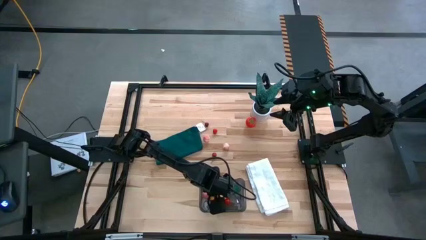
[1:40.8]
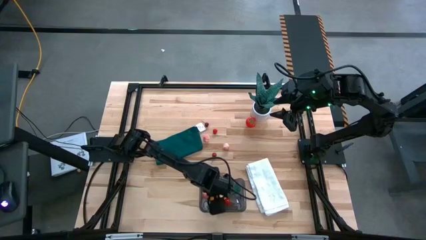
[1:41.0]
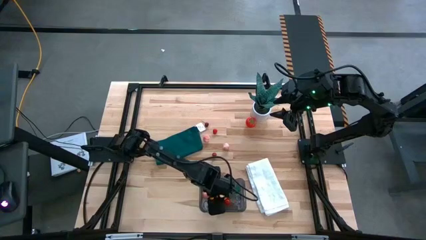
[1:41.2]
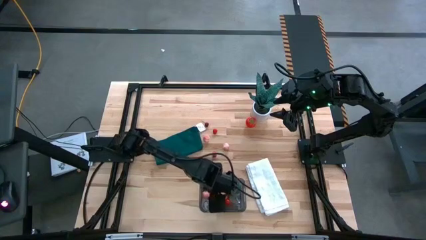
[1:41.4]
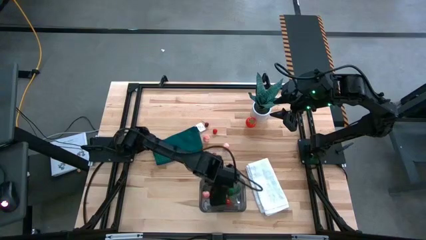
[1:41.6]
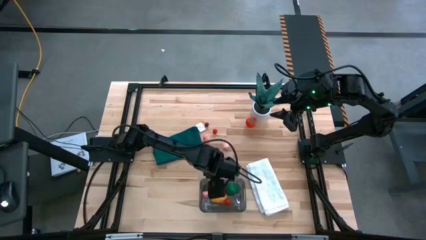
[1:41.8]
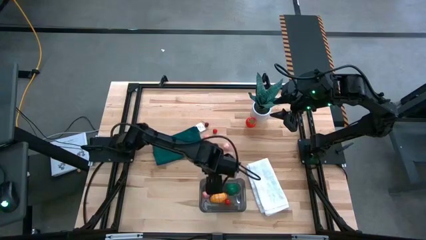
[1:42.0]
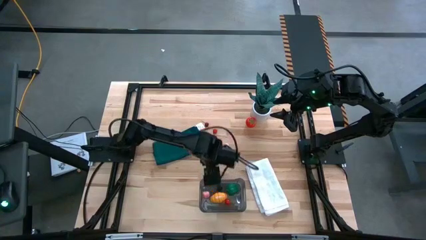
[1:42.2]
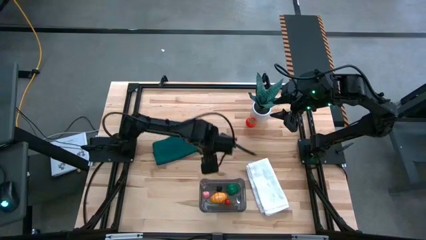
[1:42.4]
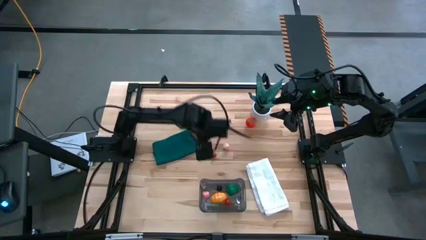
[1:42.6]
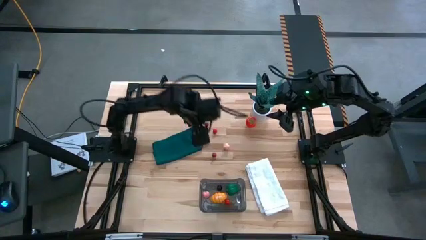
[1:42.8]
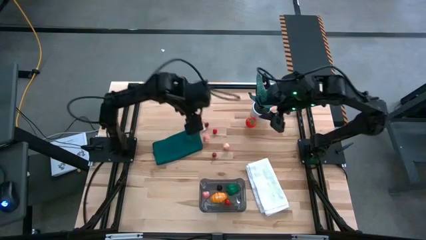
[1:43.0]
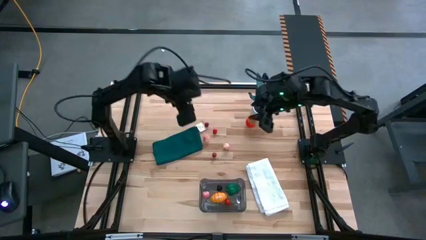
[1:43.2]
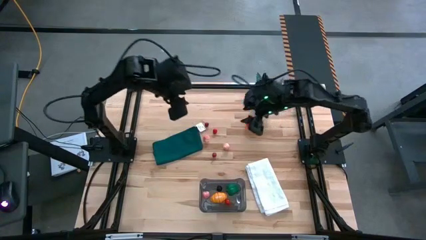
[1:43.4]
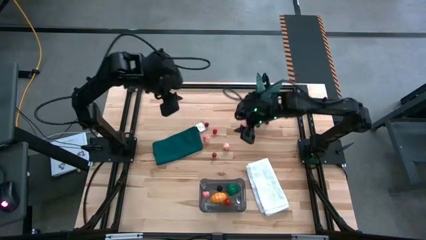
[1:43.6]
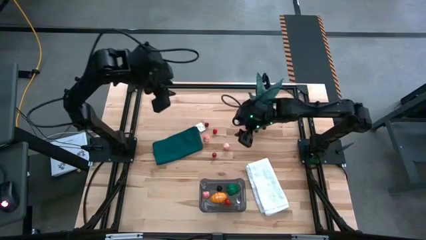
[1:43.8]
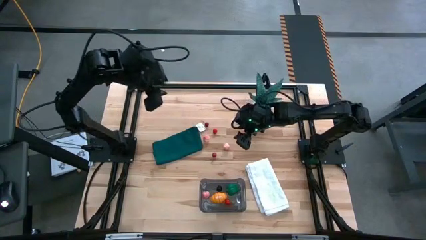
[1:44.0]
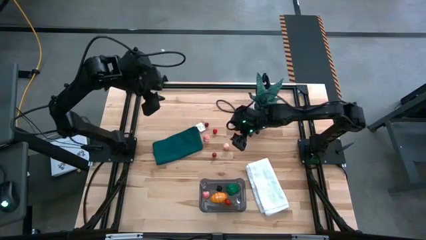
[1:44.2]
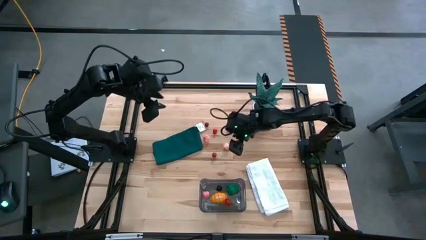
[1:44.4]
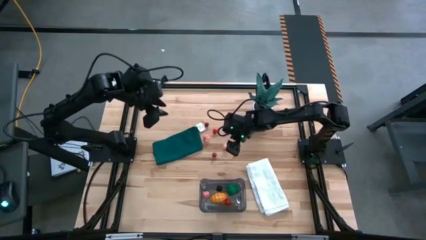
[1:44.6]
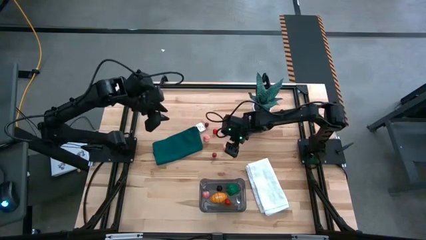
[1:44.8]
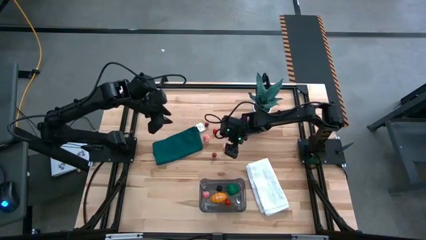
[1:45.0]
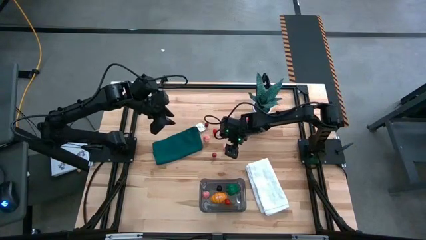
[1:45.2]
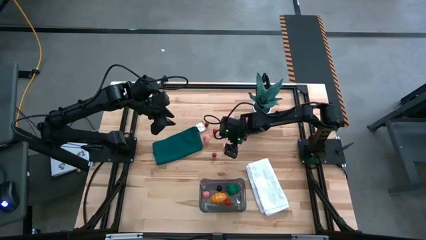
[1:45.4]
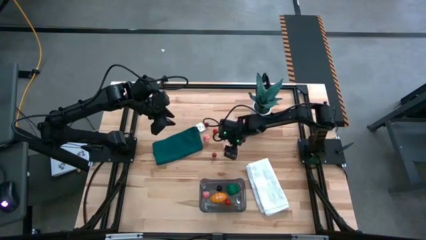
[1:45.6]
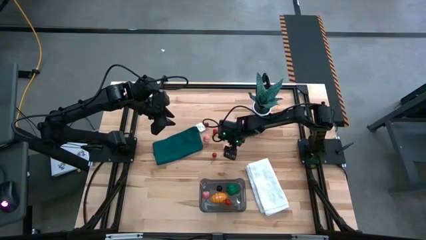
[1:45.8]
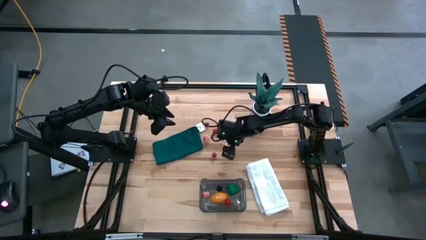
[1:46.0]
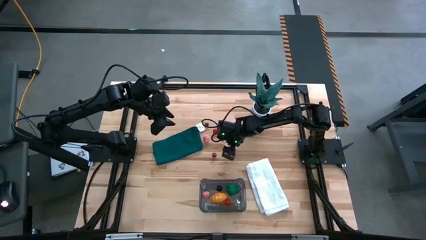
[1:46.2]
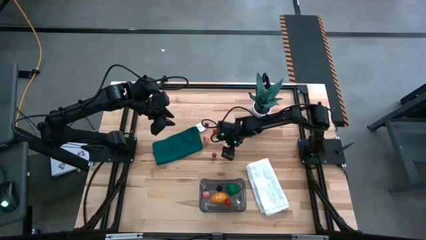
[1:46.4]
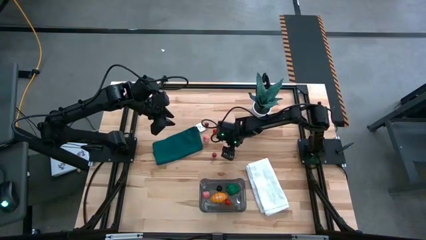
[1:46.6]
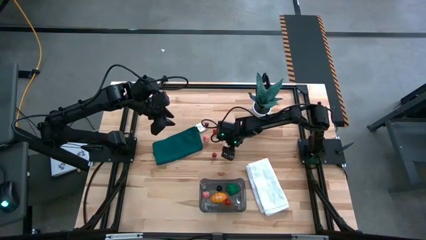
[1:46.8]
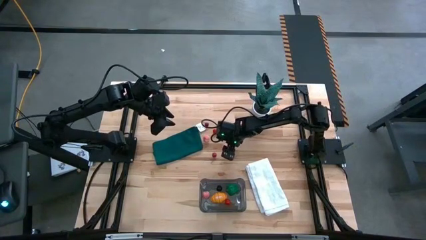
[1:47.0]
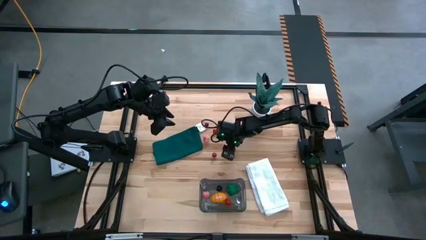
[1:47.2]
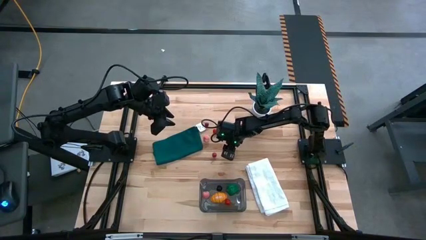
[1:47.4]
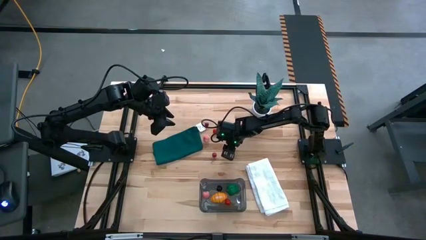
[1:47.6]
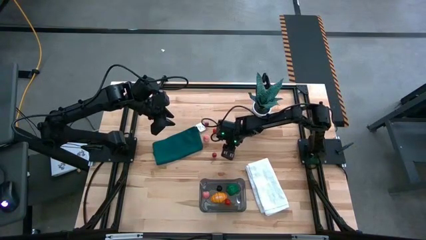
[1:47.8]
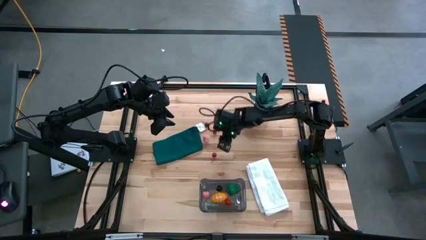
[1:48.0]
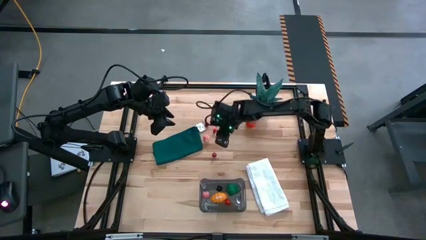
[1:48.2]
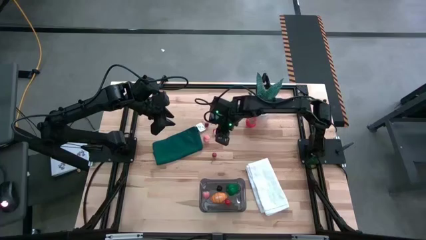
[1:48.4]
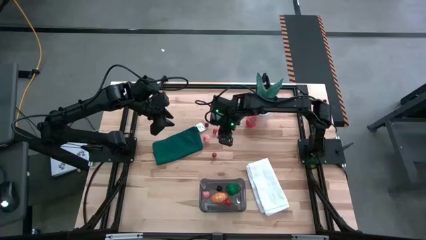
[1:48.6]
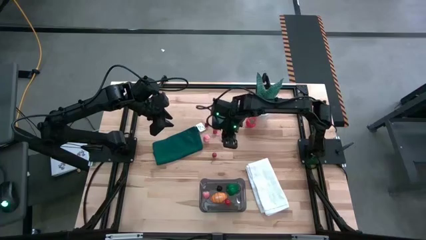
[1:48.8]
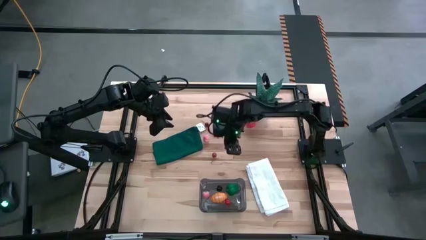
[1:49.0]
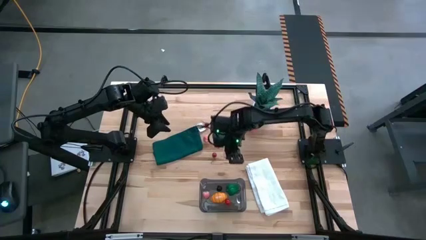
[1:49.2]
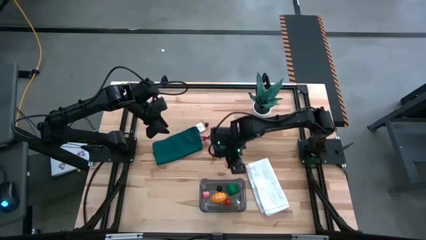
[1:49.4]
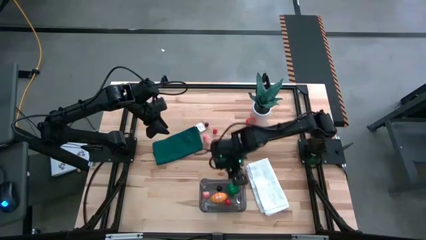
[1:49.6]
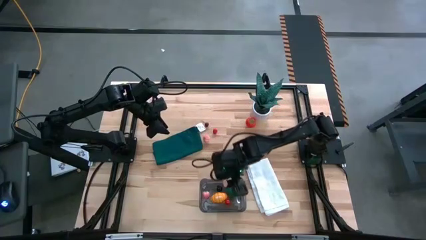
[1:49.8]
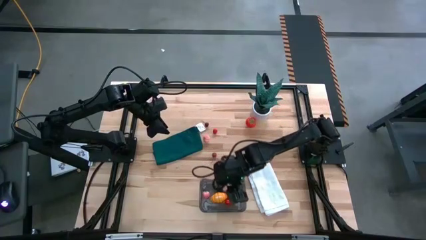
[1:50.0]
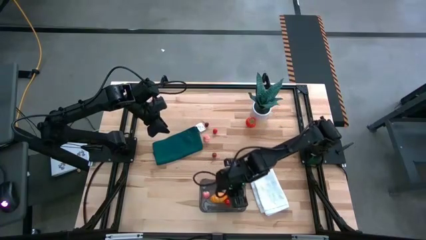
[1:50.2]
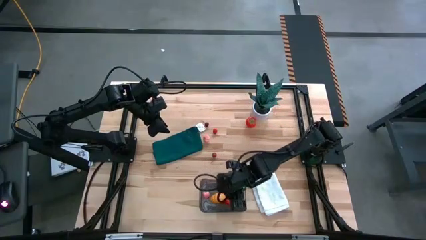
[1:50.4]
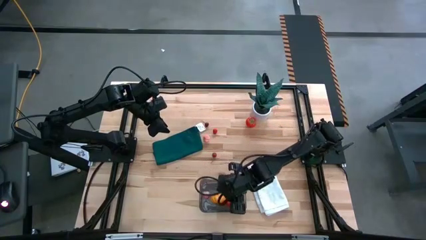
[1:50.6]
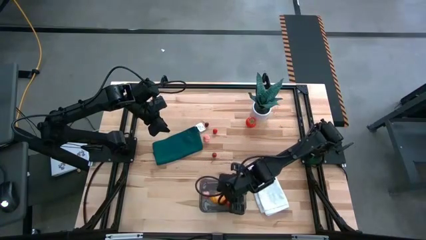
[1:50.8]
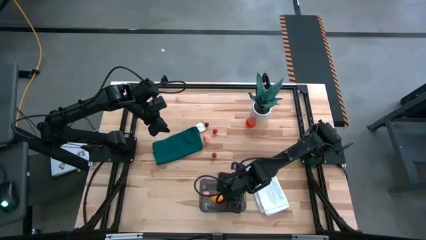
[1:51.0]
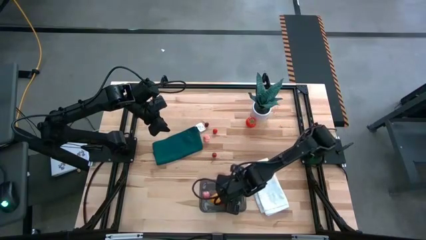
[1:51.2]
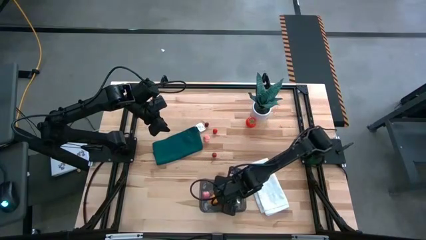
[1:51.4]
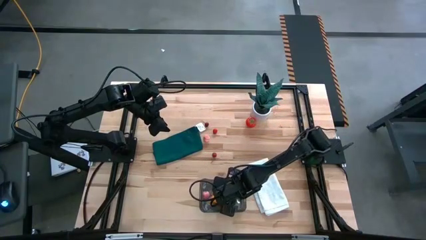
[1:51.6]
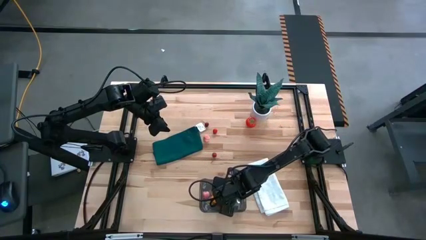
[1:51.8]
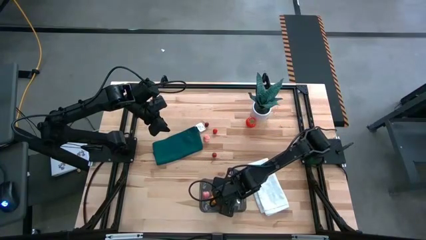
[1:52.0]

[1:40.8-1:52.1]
Task: Pick and placing Produce into tupperware
Put the right pink peach into the black bin

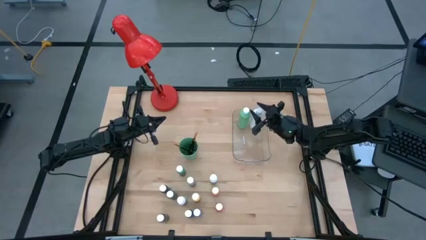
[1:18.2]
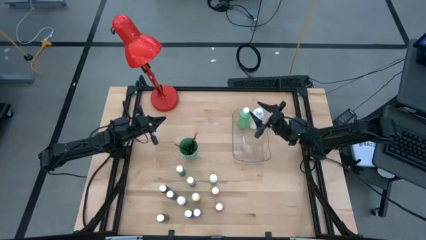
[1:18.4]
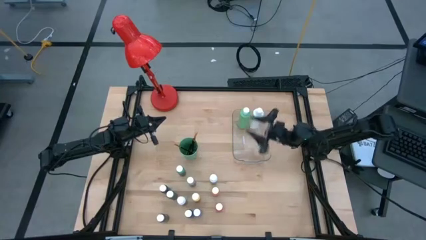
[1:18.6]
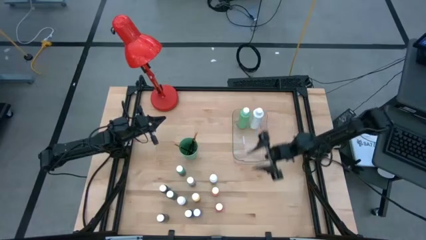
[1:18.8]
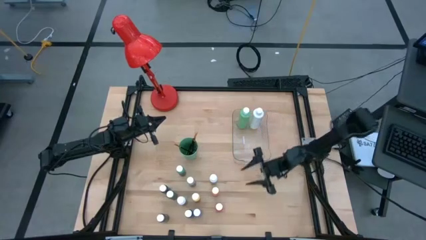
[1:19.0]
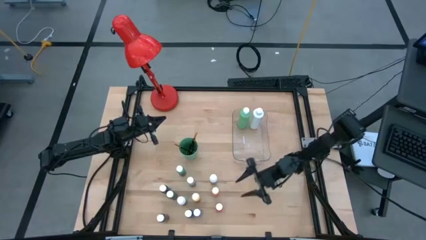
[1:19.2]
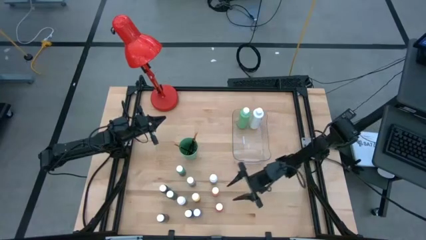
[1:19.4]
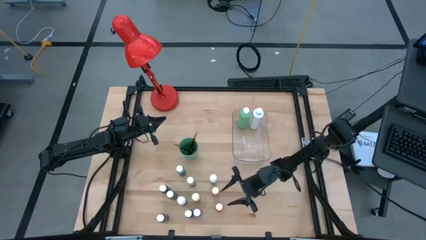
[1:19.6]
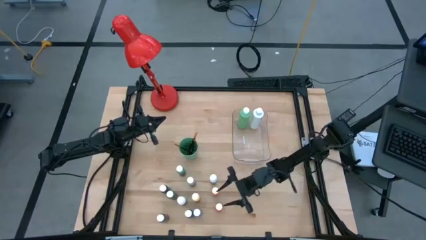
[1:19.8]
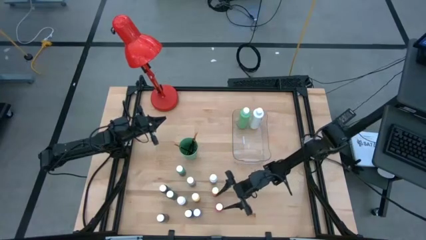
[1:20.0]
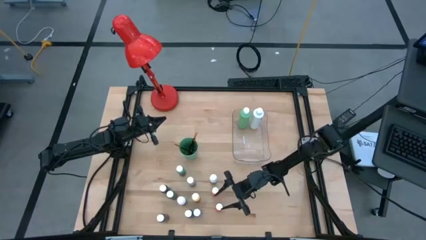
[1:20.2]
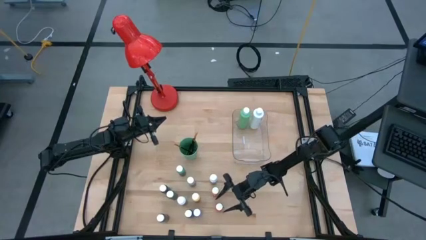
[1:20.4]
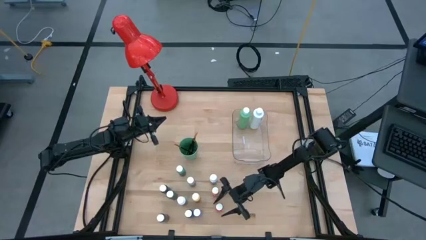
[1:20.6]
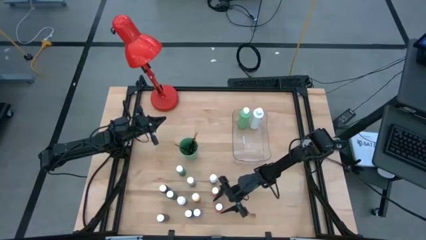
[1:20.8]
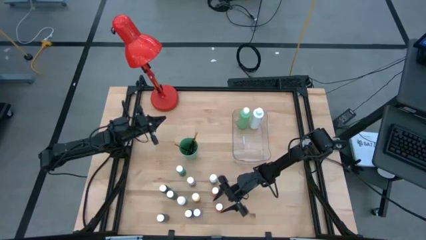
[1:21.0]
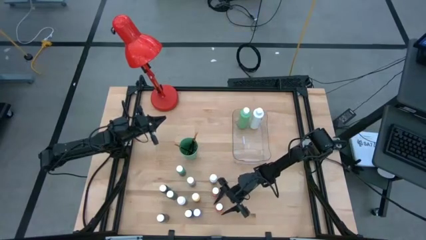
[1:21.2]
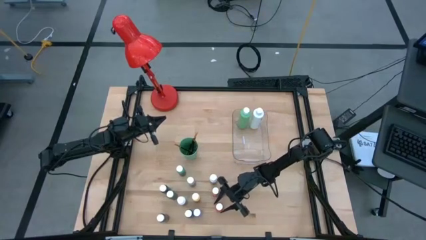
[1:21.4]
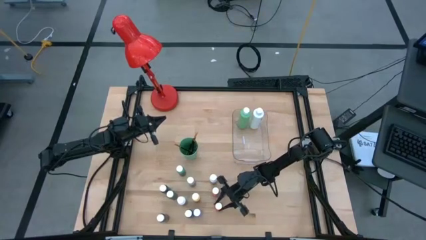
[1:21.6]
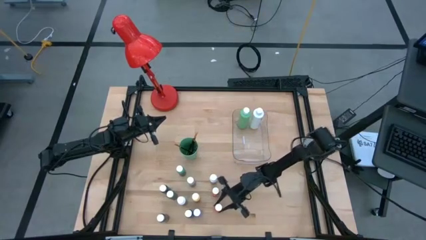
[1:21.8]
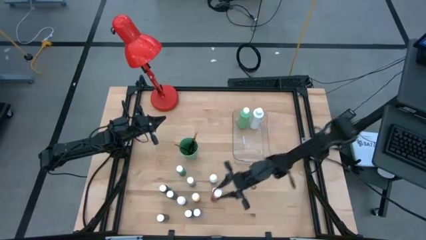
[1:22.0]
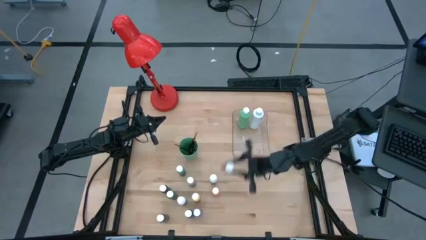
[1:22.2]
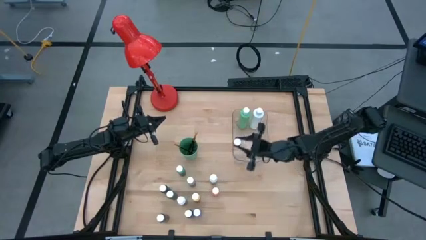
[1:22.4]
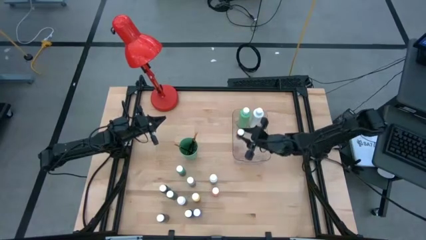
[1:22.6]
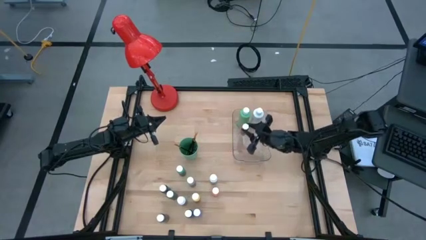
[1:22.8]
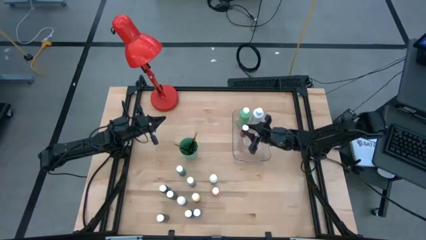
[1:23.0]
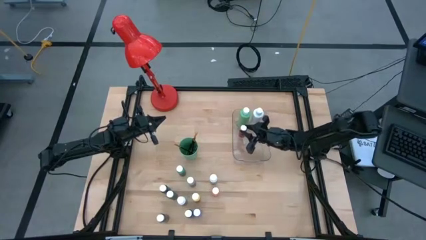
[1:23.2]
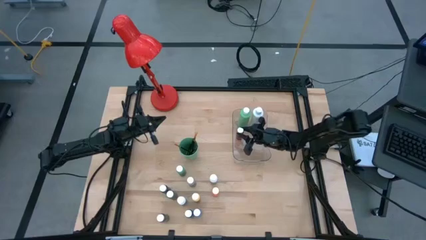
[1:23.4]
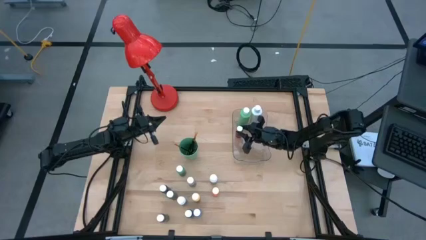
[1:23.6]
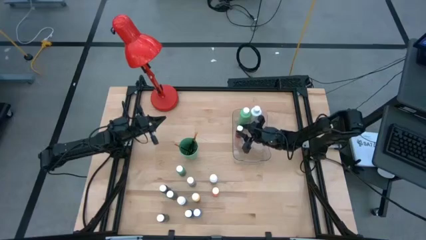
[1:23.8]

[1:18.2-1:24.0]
Task: Pick & Place Paint Supplies
Put the bottom small orange paint bottle into the transparent bin
